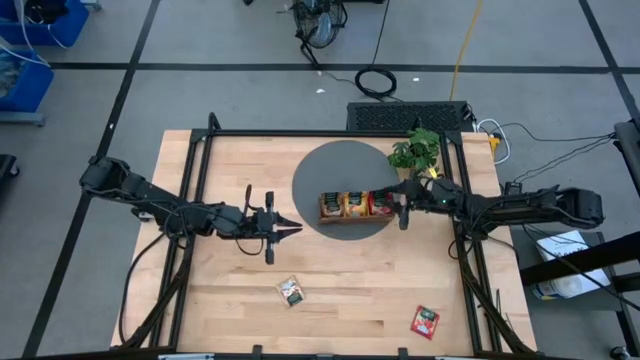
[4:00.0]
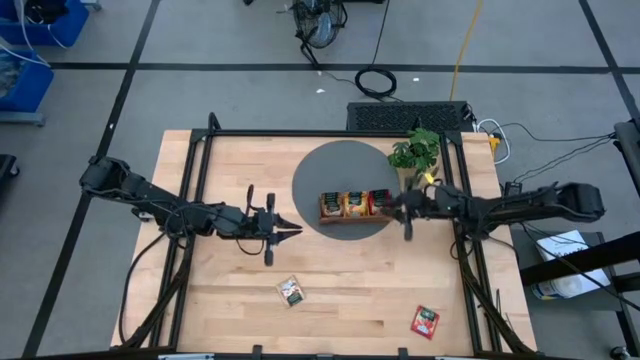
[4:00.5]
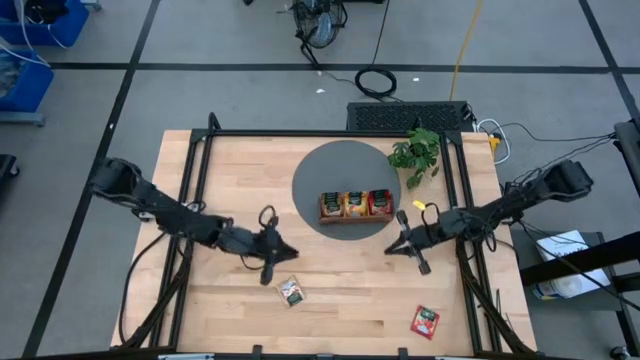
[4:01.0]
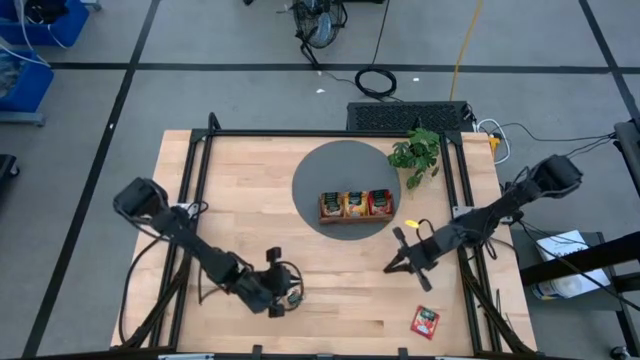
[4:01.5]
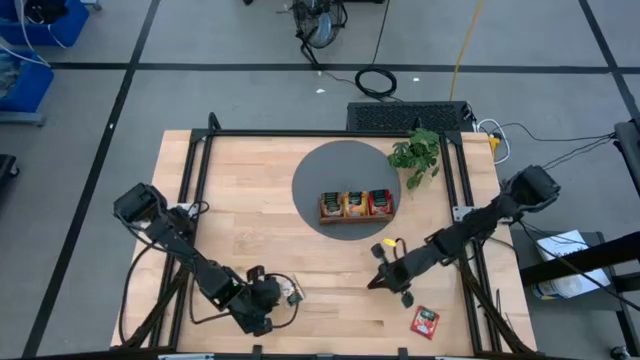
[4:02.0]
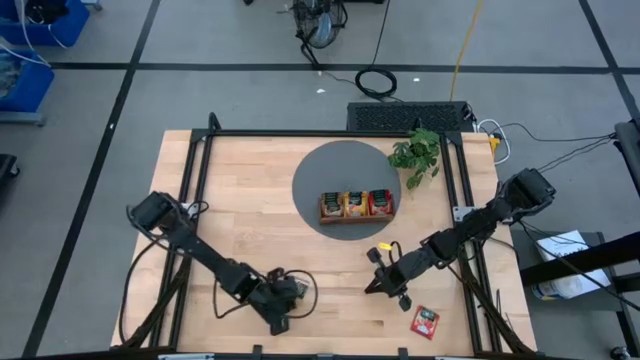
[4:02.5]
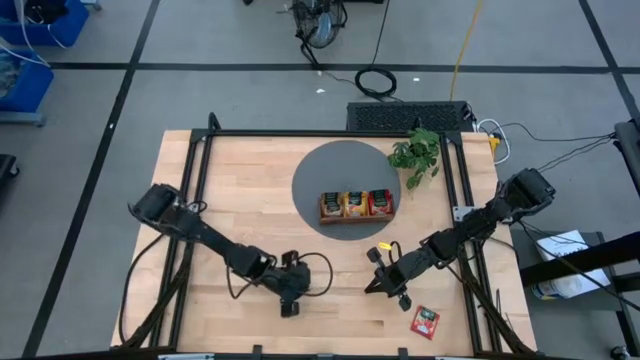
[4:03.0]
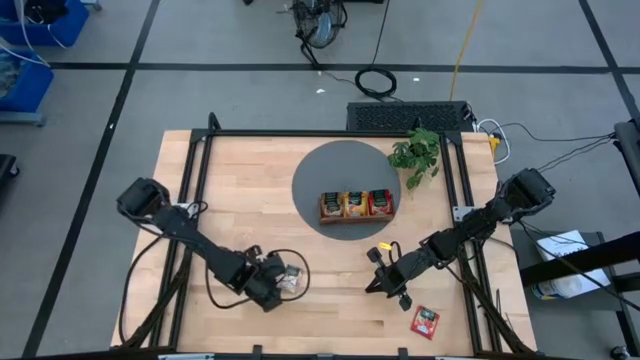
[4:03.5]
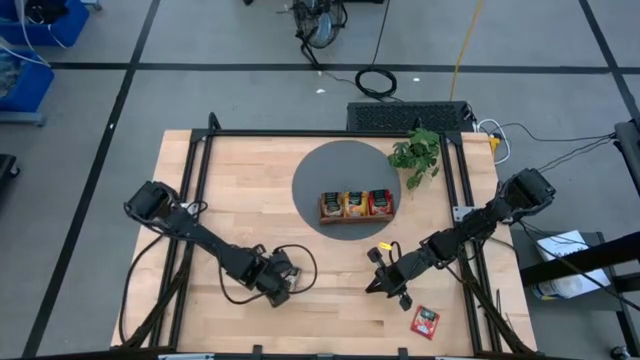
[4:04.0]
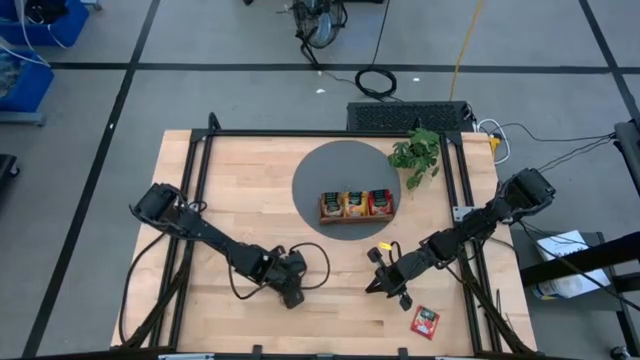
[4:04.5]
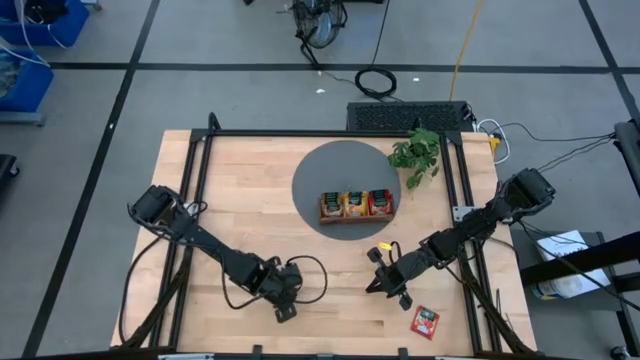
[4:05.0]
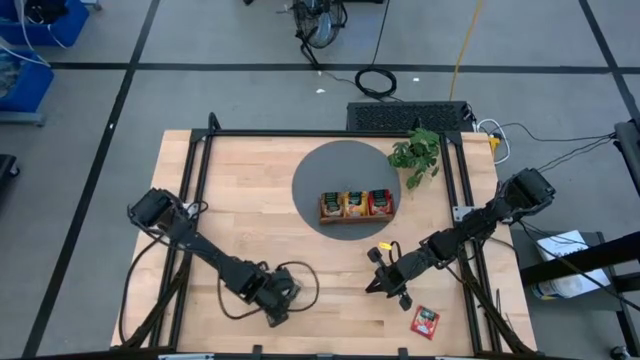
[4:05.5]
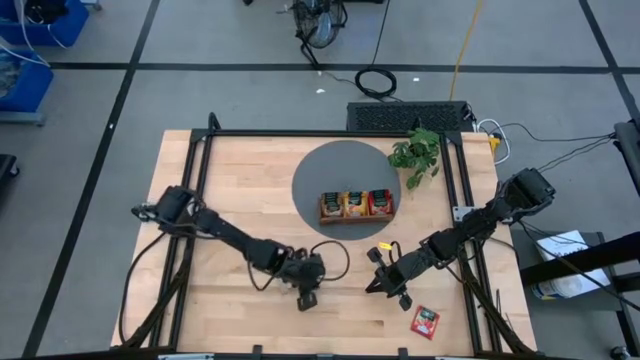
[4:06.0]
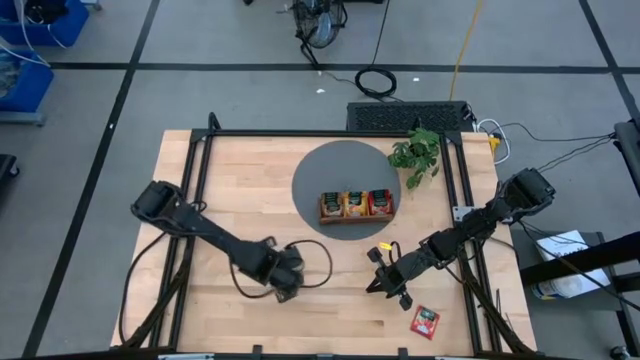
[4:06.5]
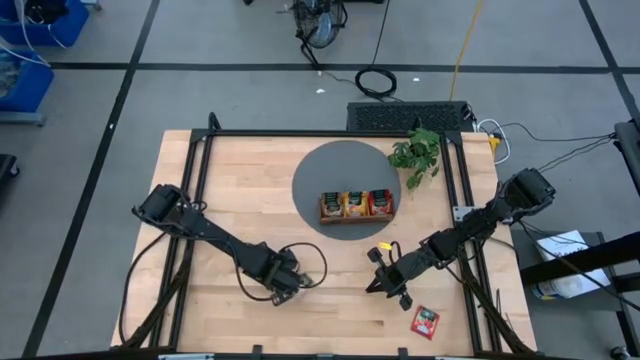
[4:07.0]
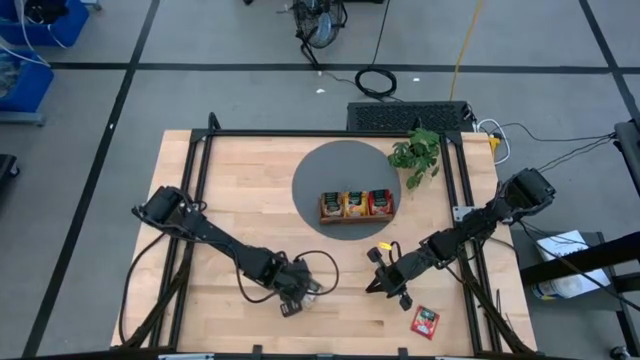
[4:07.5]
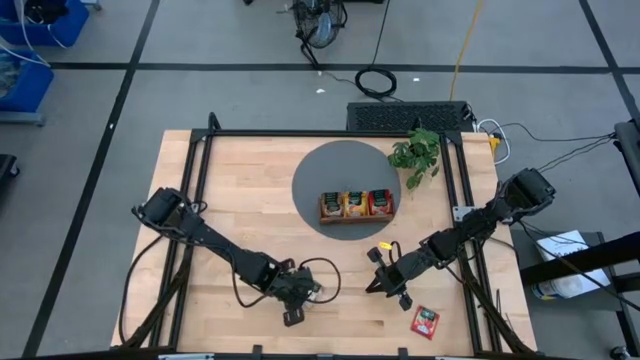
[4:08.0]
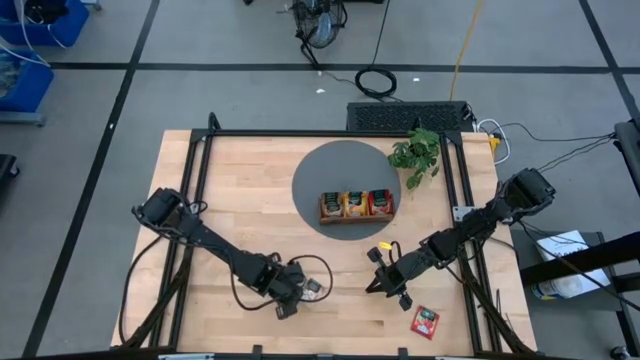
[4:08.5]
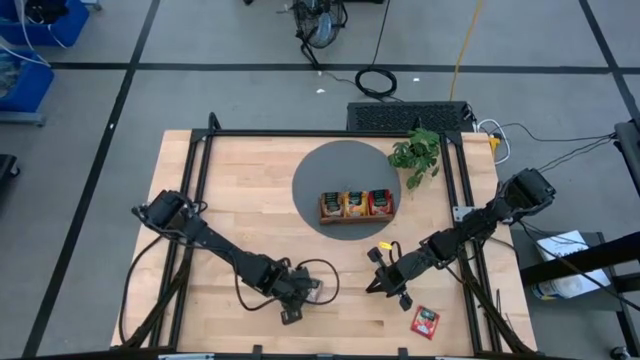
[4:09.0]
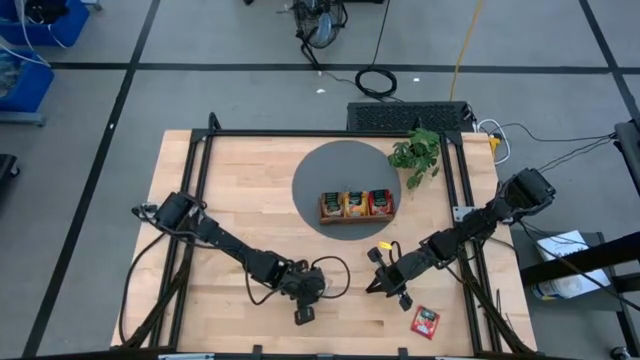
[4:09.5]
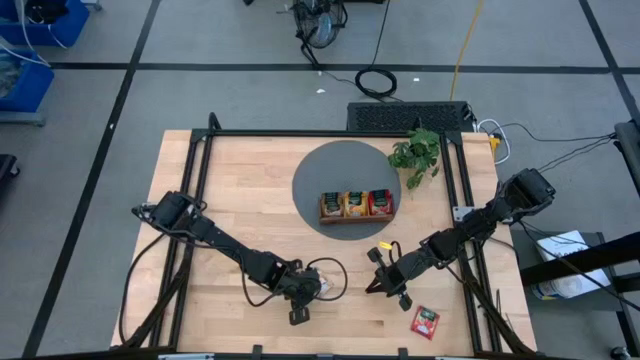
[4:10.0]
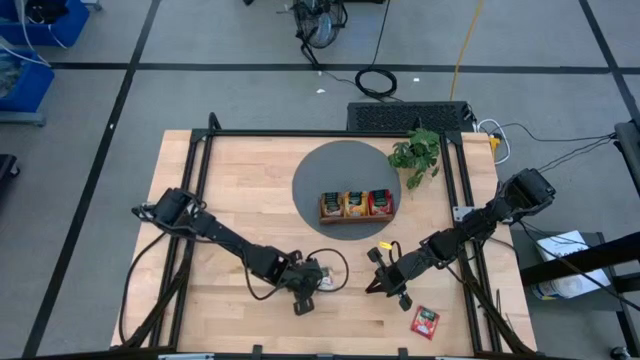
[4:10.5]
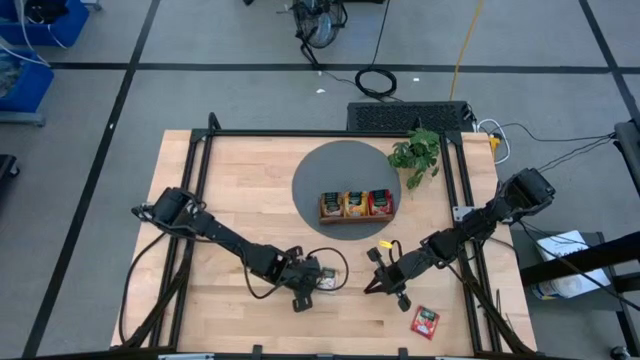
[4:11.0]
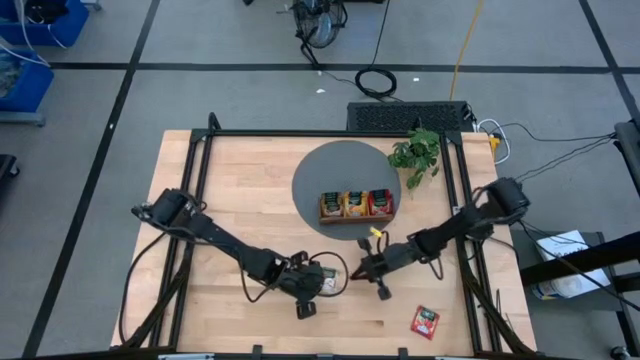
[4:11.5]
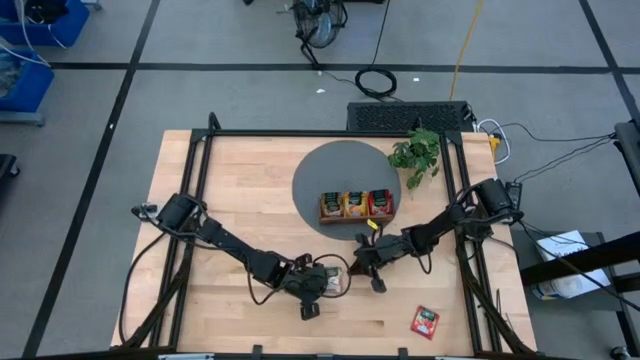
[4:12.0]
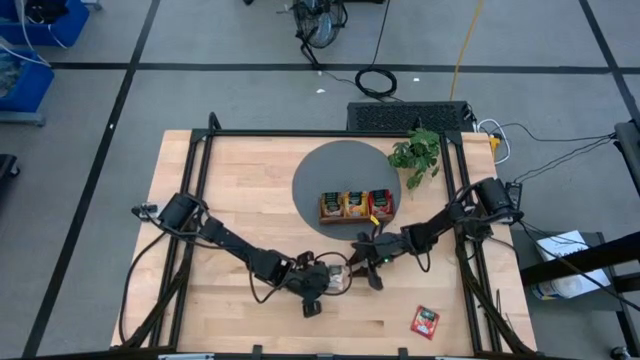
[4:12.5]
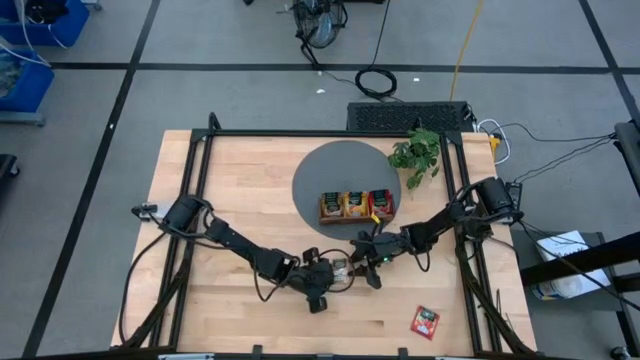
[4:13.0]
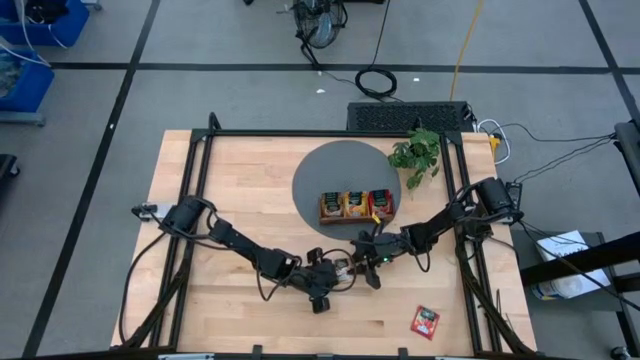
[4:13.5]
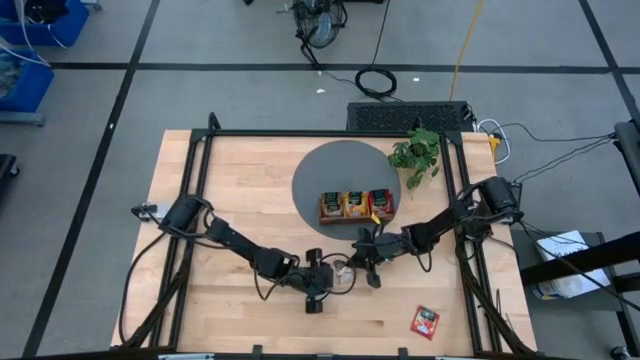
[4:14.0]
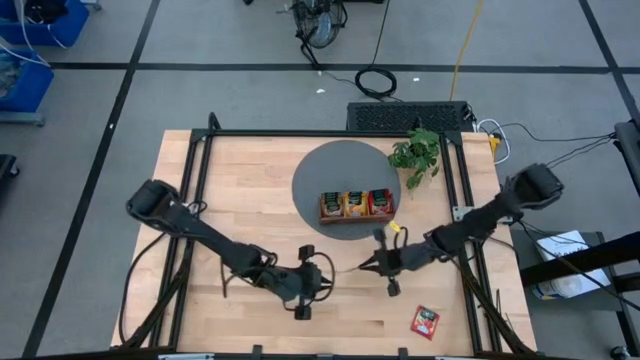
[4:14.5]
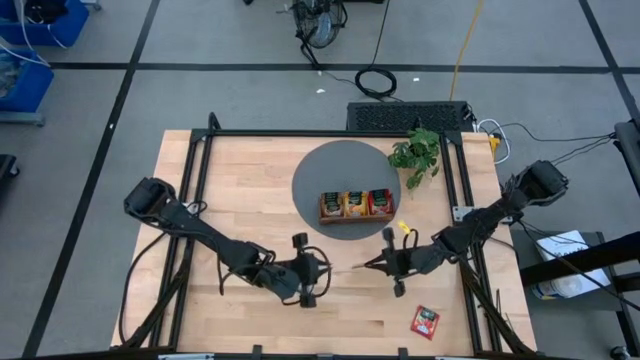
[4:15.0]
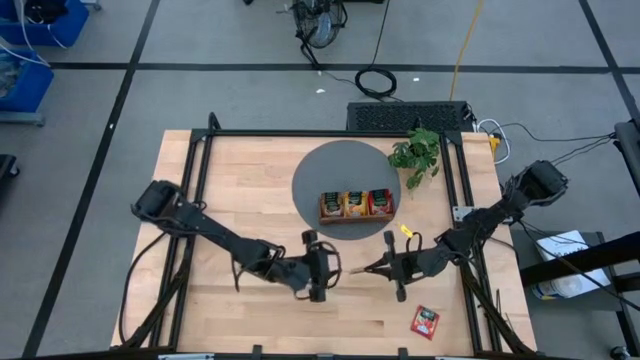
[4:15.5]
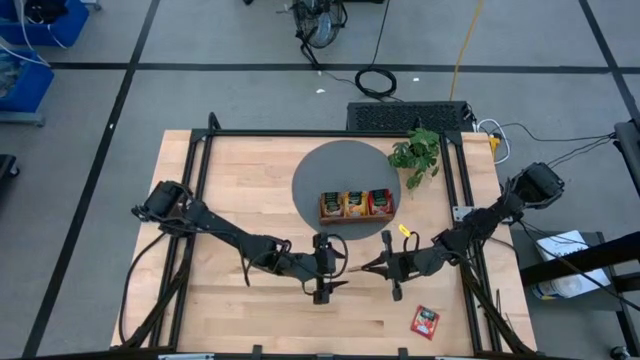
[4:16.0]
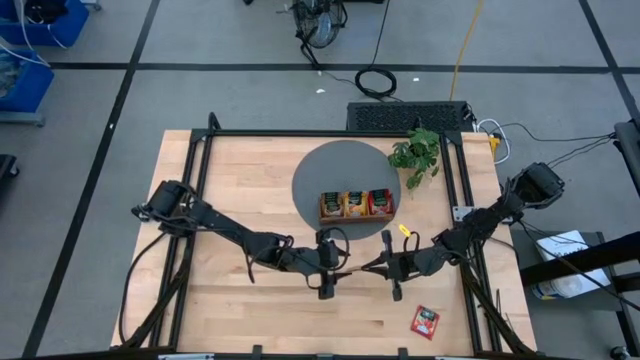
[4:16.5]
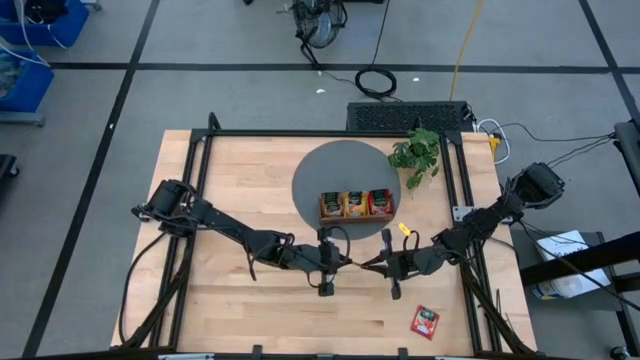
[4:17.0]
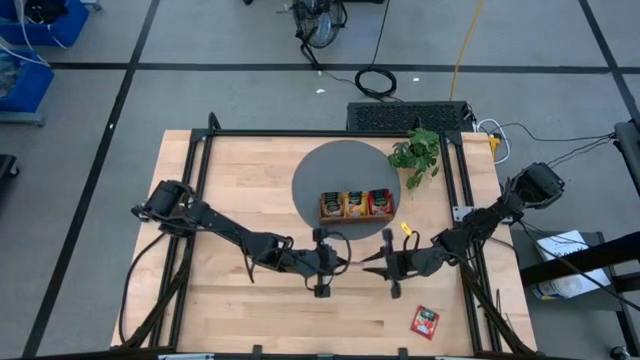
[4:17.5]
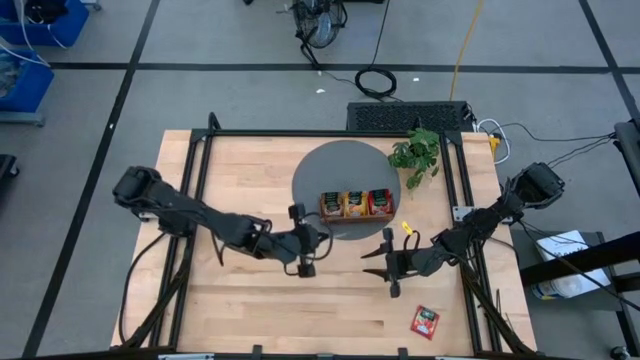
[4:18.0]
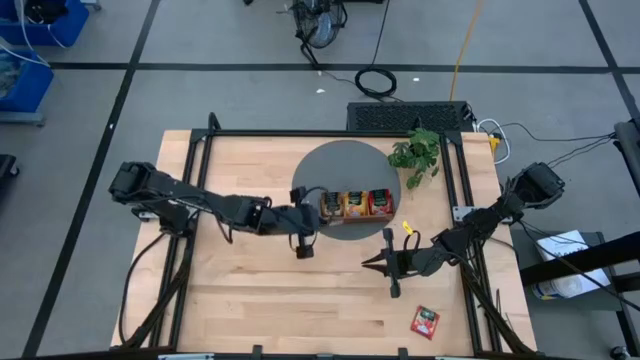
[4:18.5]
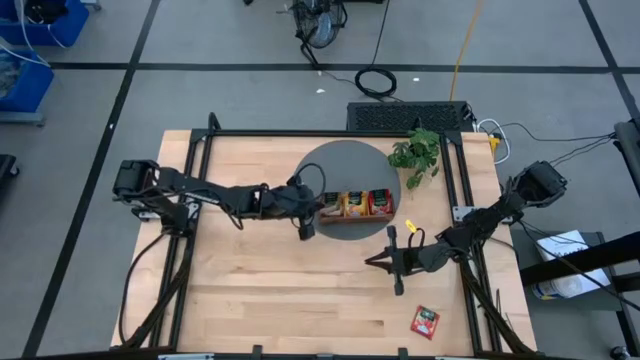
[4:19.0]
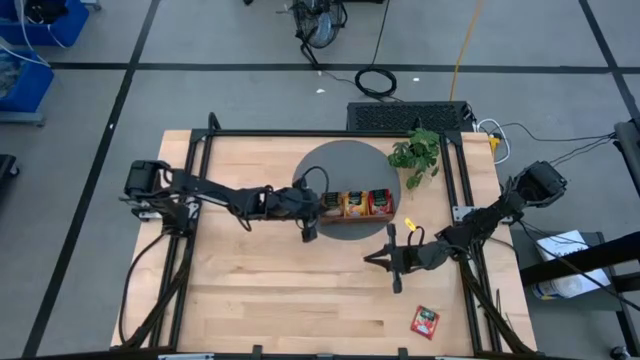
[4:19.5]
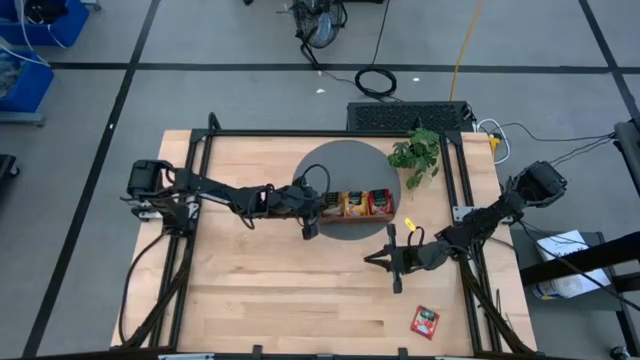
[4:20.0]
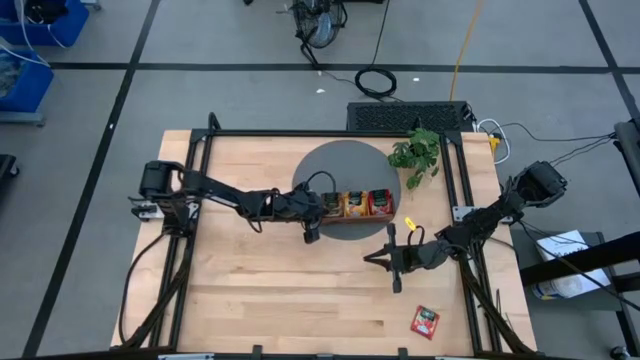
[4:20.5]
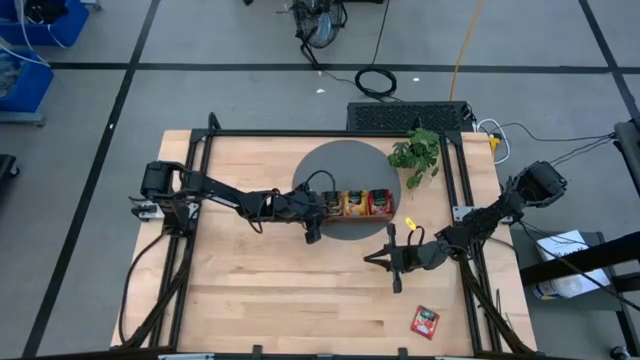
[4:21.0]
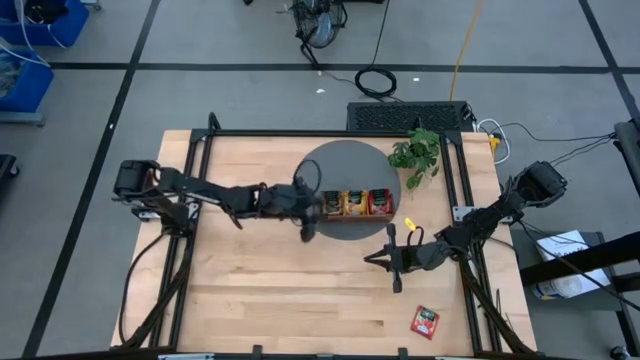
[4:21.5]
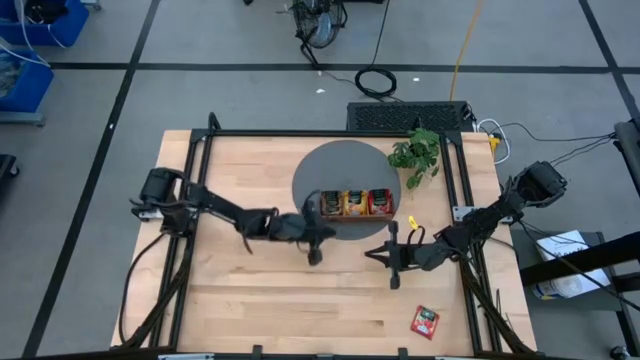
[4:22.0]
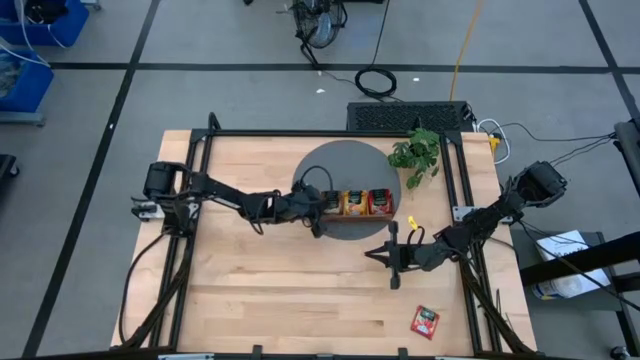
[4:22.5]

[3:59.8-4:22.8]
Task: Pick & Place Tea
Put the brown tea bag into the left section of the wooden organiser
